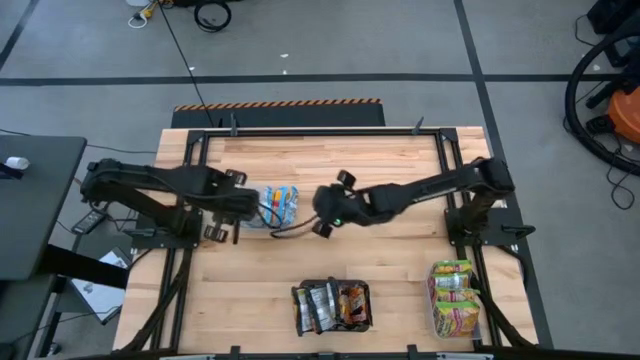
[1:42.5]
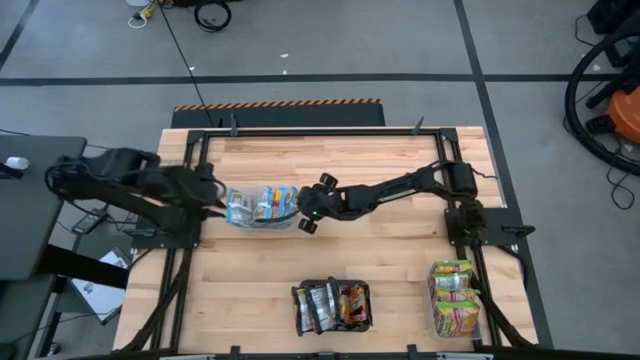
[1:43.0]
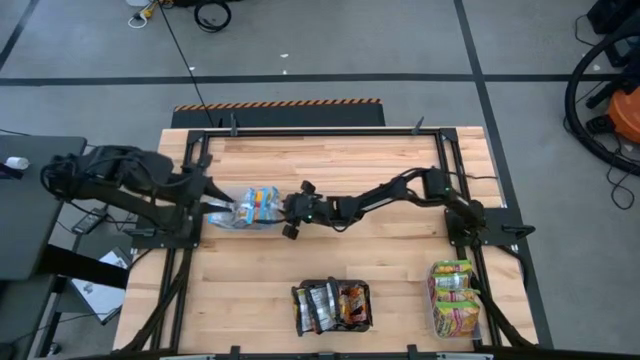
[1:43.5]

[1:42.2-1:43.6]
Task: Sort Maruchan noodles
Adjust the top transparent bin

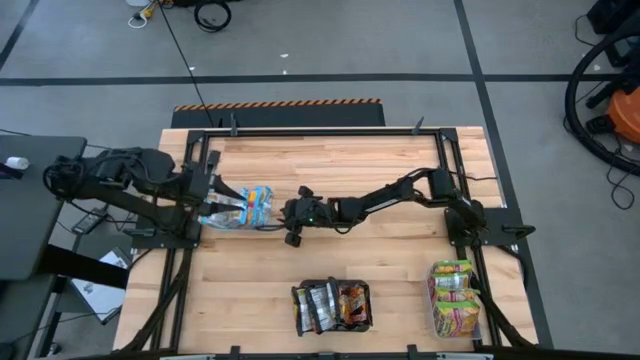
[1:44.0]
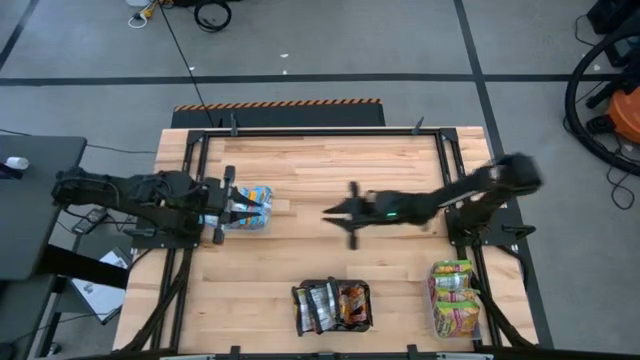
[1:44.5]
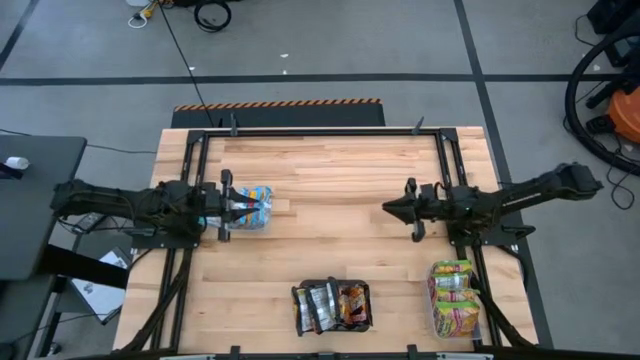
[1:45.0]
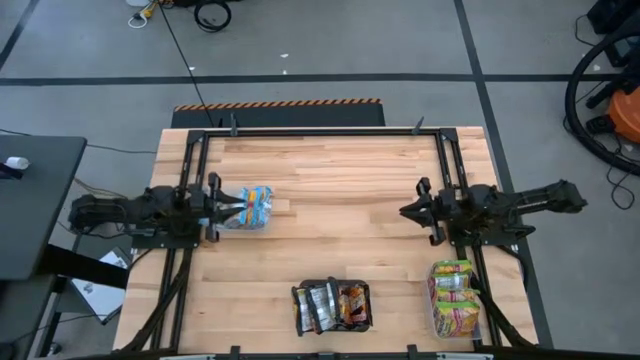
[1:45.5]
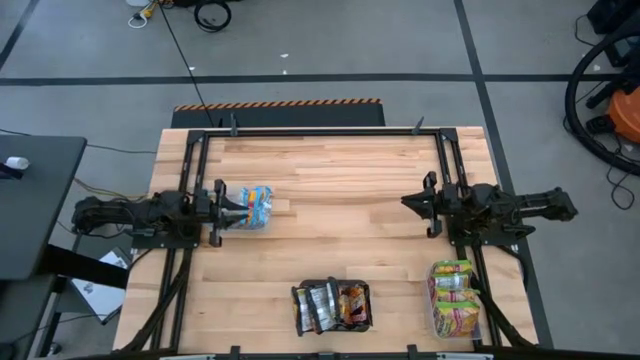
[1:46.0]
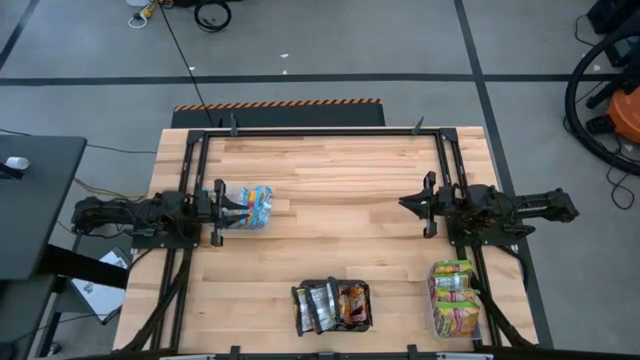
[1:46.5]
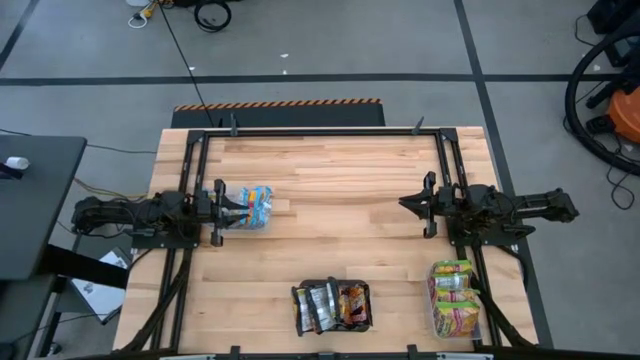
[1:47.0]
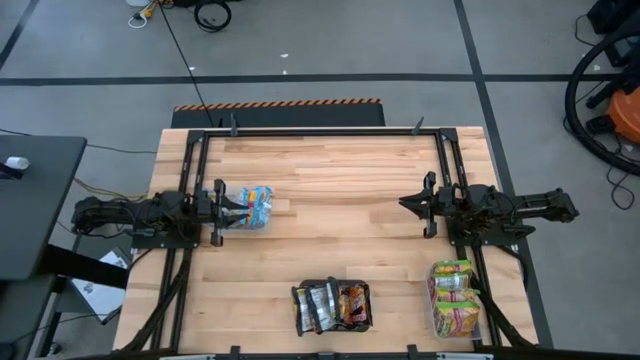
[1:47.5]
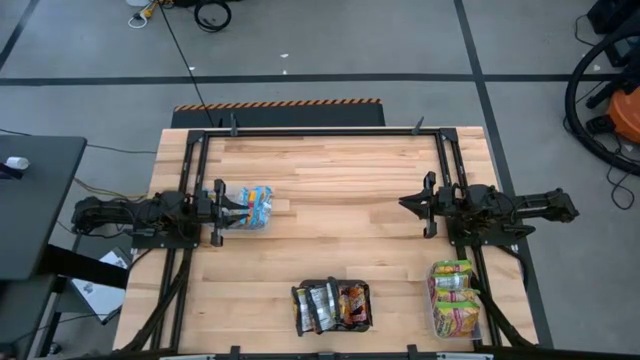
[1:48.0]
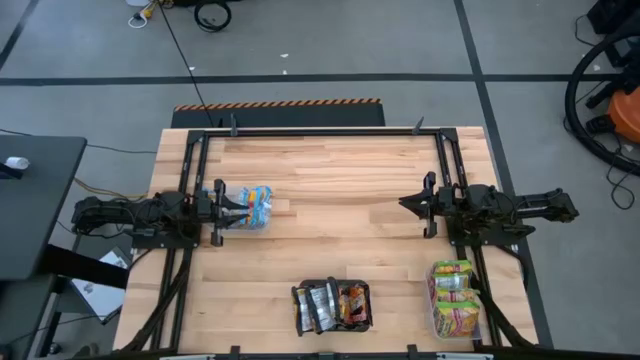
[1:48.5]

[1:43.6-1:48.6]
Return to Home Position

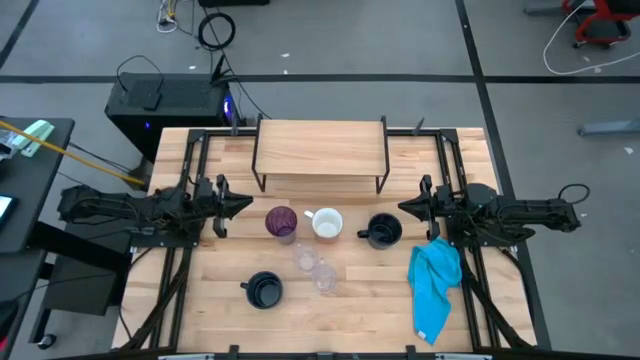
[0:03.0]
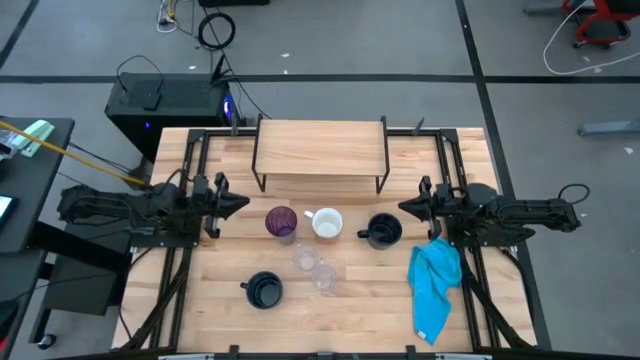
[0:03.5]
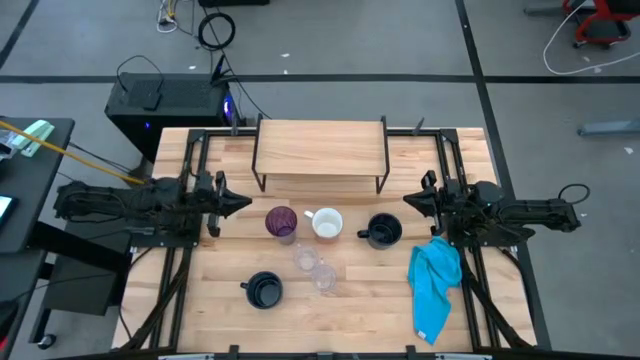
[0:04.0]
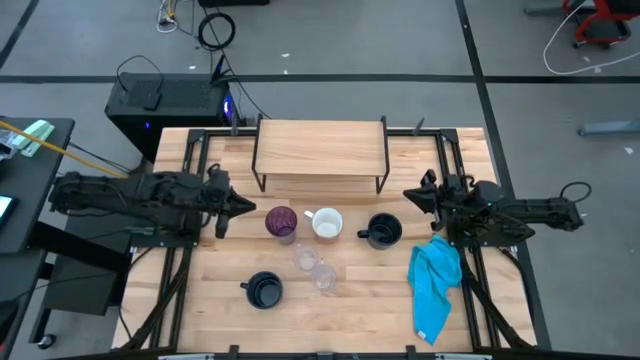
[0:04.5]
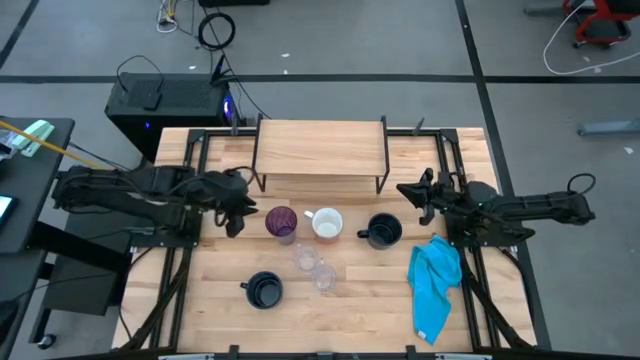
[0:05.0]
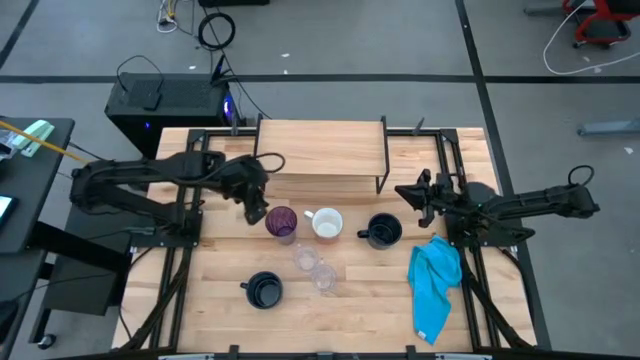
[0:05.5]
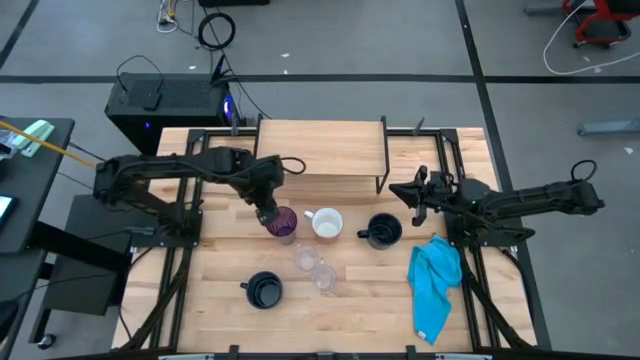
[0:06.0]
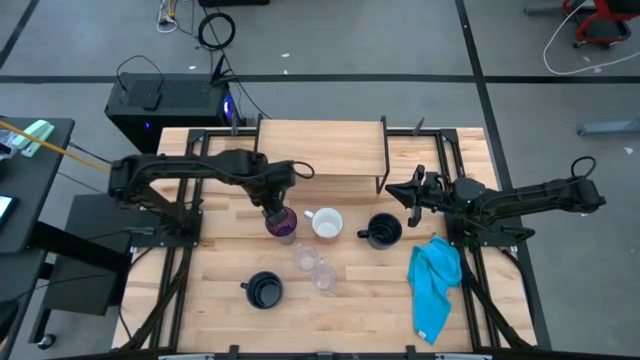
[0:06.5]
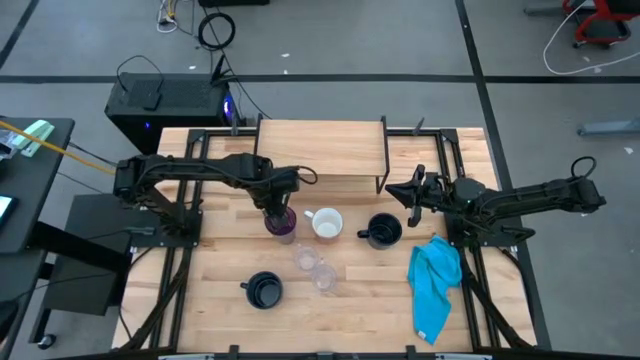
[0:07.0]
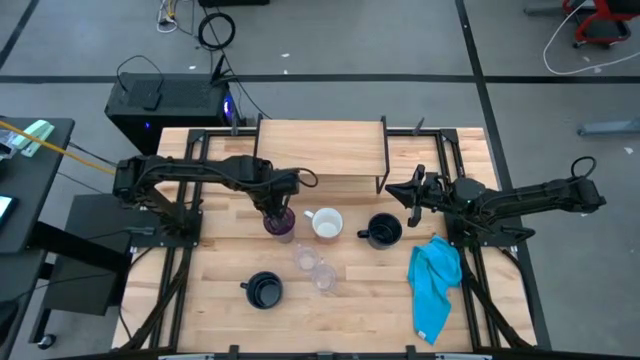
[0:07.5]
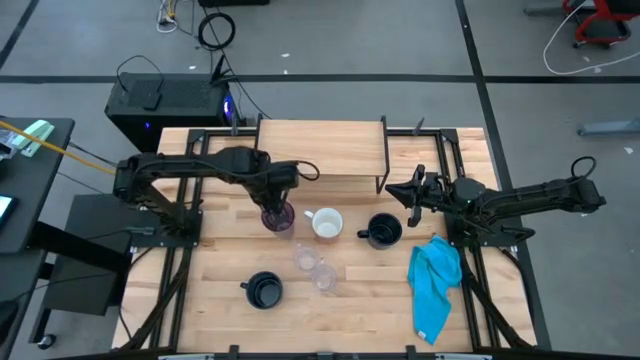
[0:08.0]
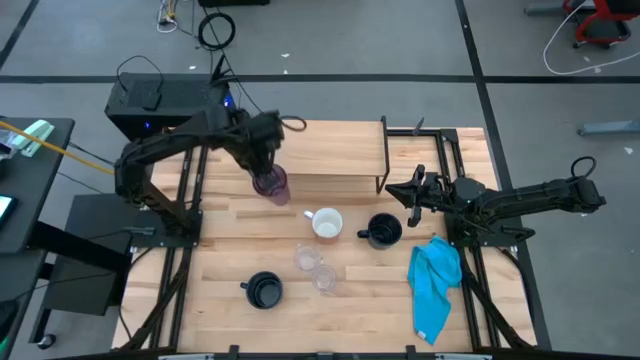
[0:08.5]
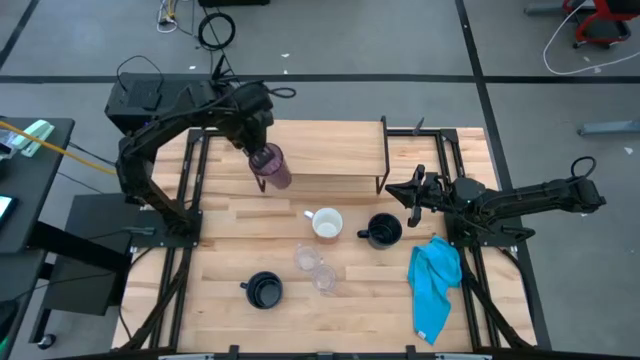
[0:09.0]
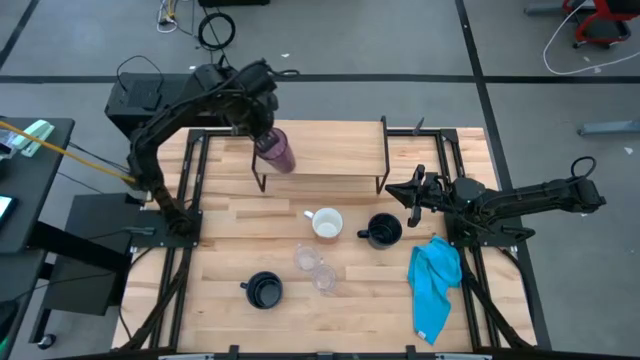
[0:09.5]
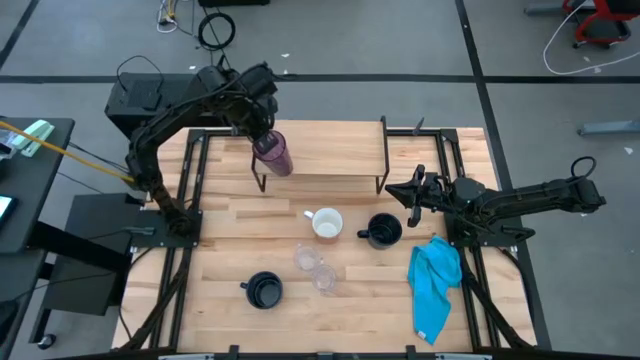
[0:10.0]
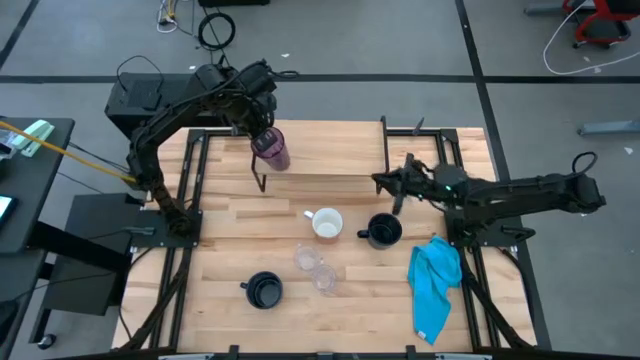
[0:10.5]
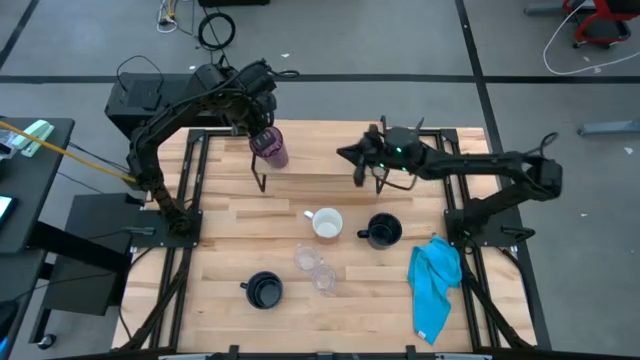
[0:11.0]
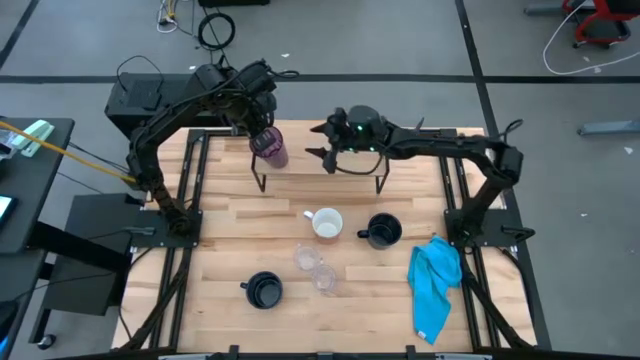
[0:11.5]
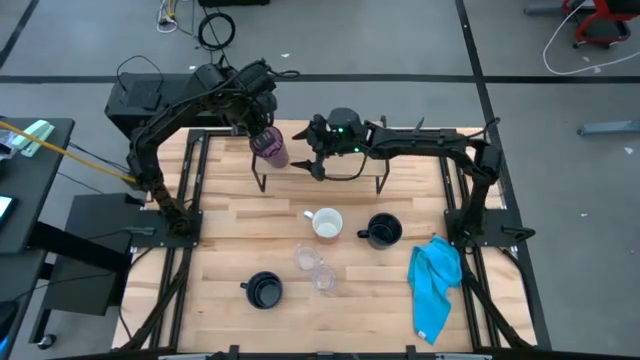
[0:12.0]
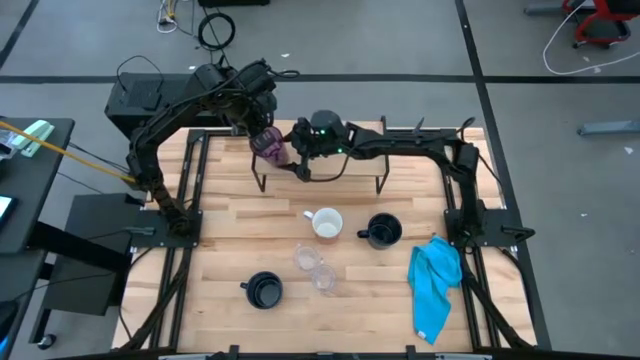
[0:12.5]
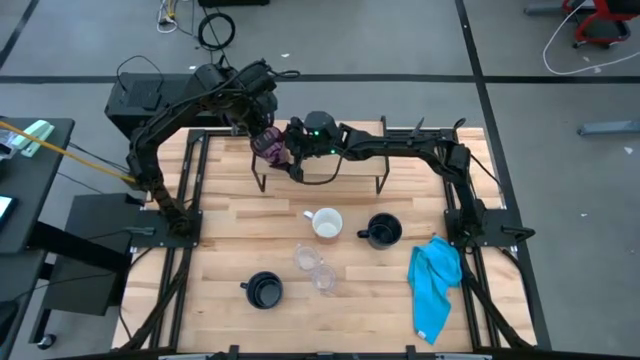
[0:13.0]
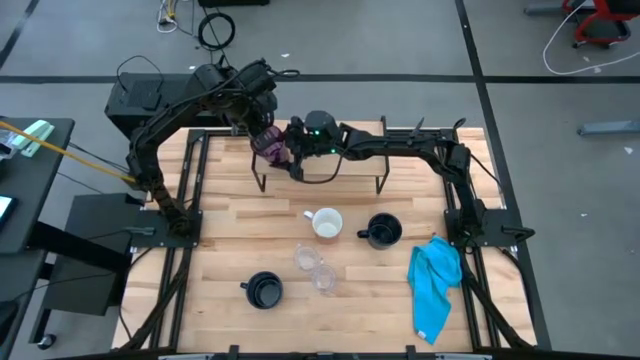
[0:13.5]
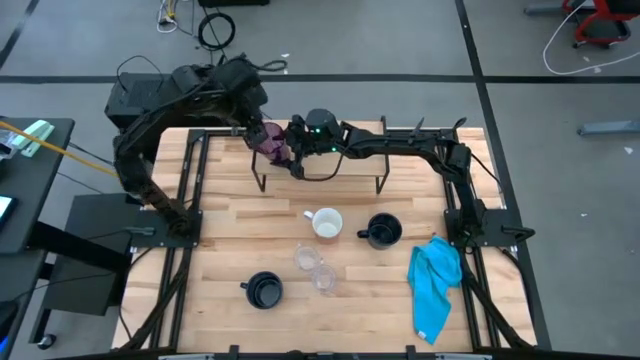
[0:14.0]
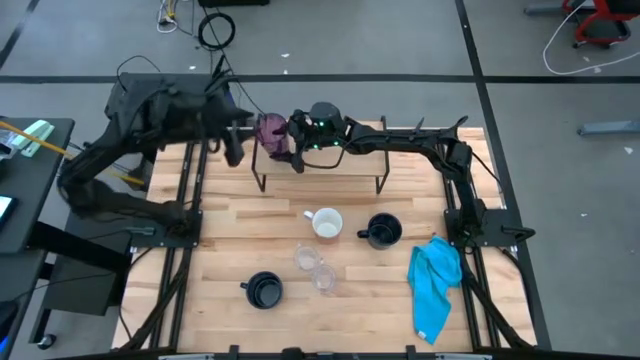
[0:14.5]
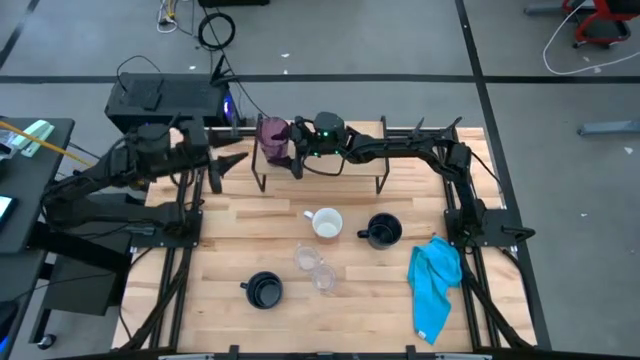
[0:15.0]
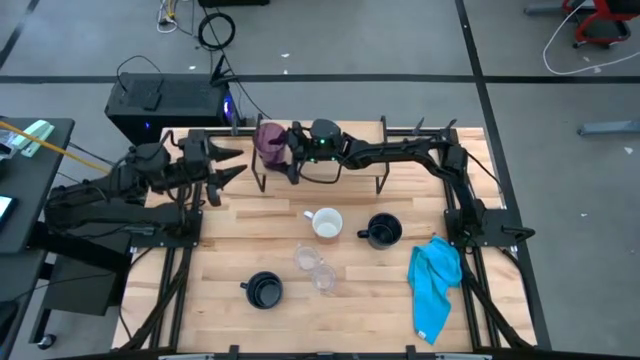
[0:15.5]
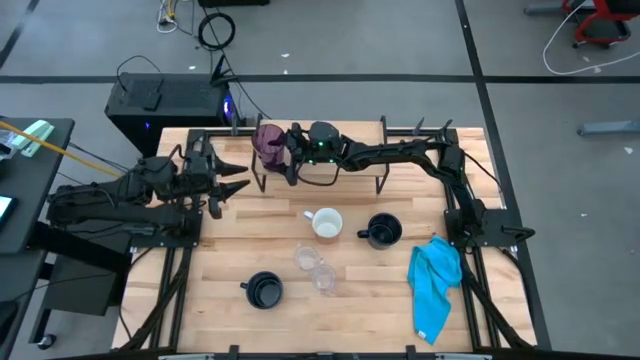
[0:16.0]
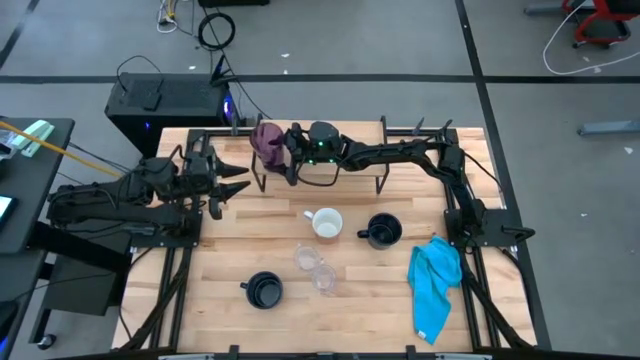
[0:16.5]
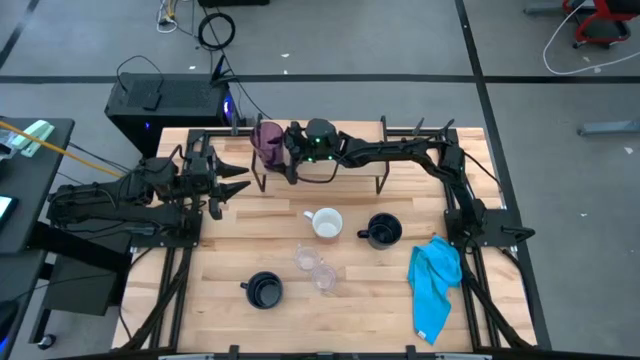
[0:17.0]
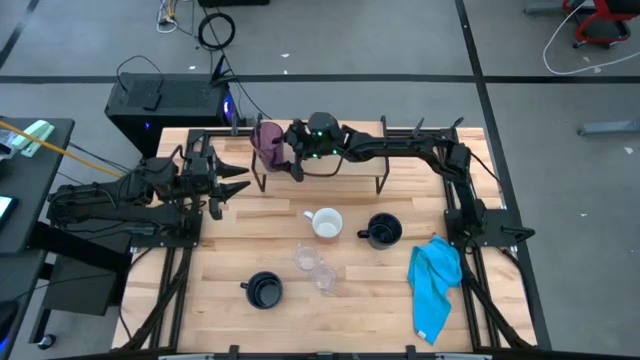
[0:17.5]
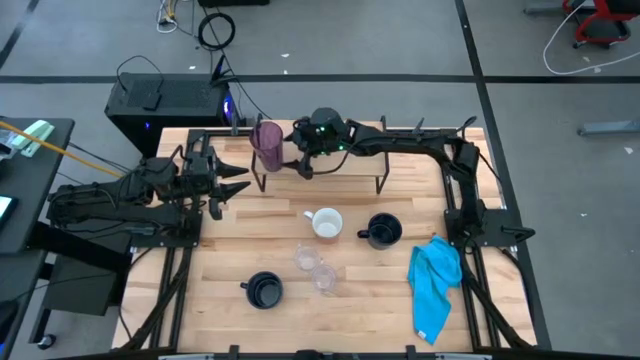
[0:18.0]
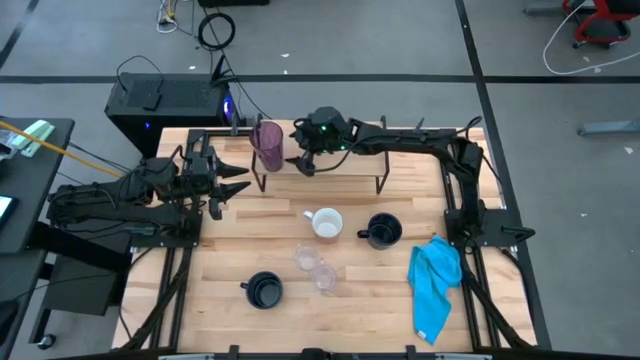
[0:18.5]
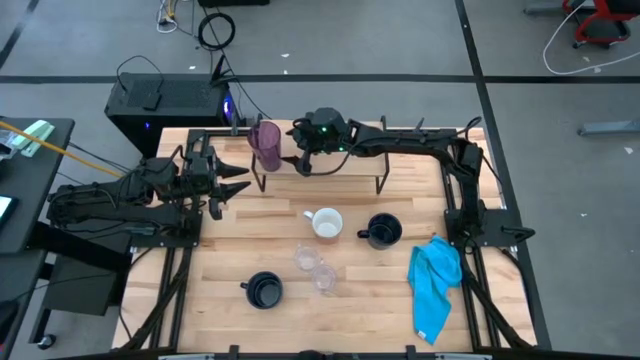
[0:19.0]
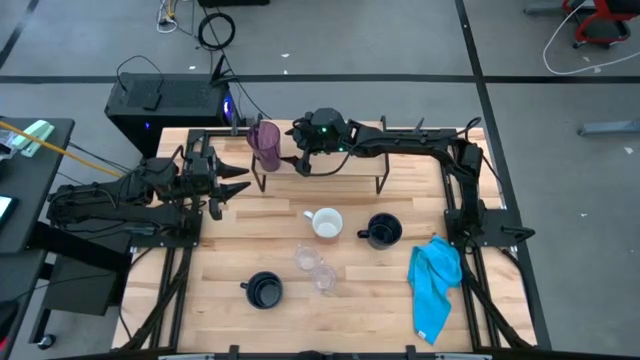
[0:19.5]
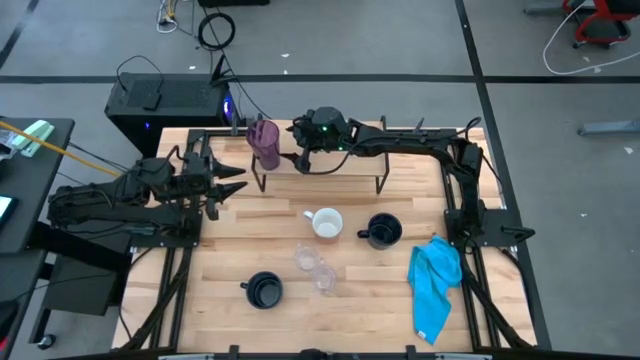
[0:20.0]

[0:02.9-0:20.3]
Task: Stack small to large cups/mugs on shelf
Put the purple cup on the shelf
